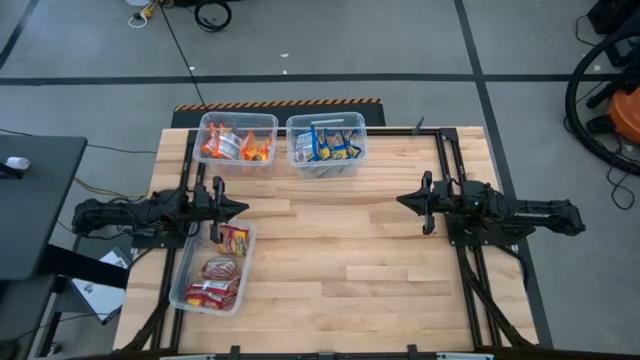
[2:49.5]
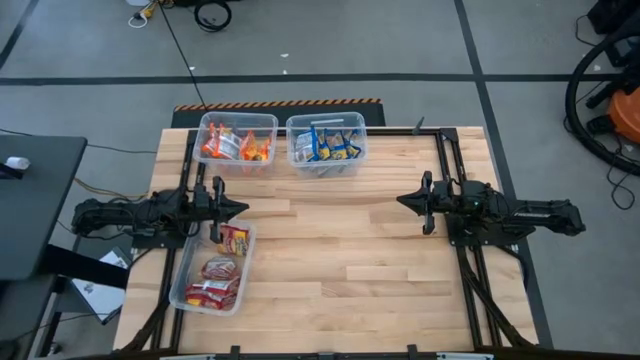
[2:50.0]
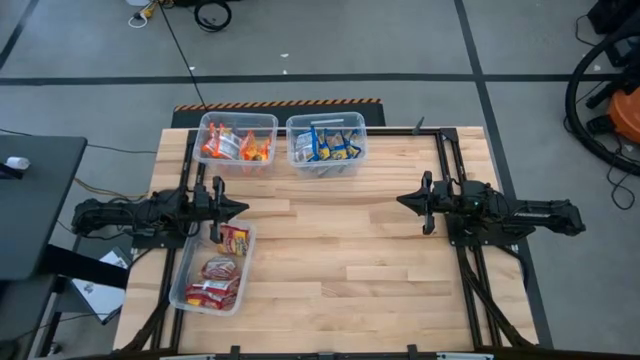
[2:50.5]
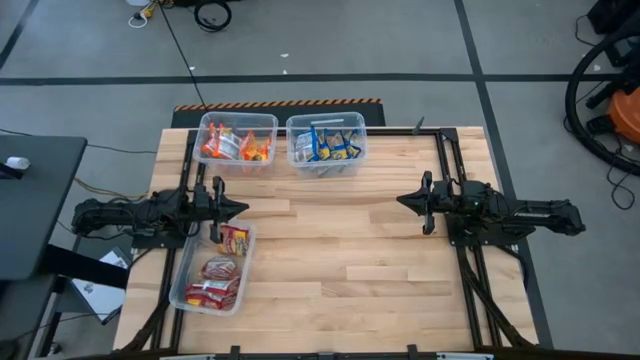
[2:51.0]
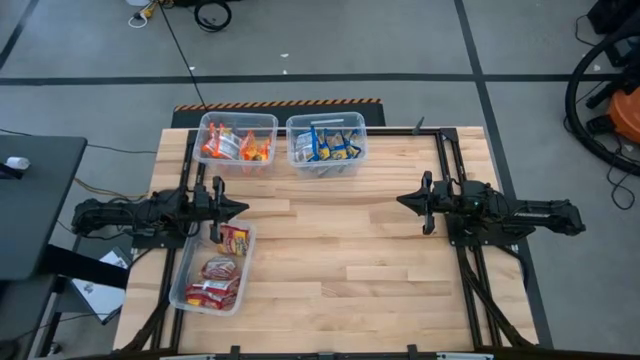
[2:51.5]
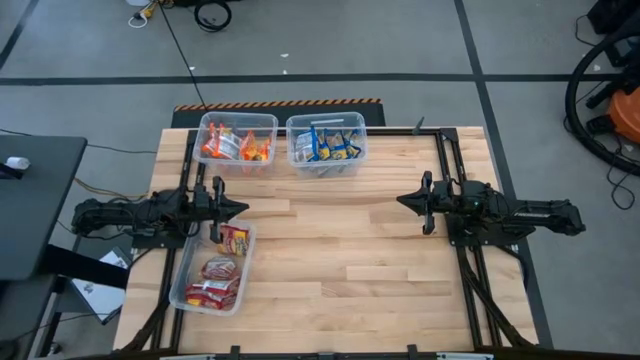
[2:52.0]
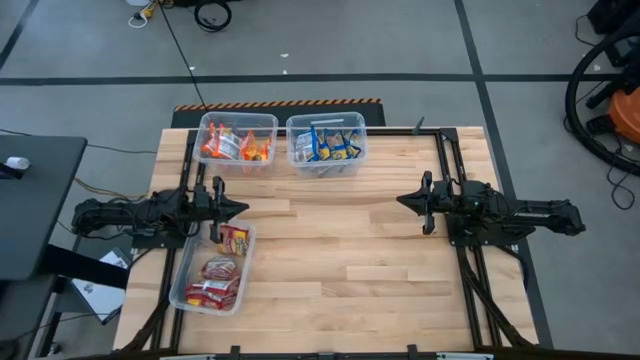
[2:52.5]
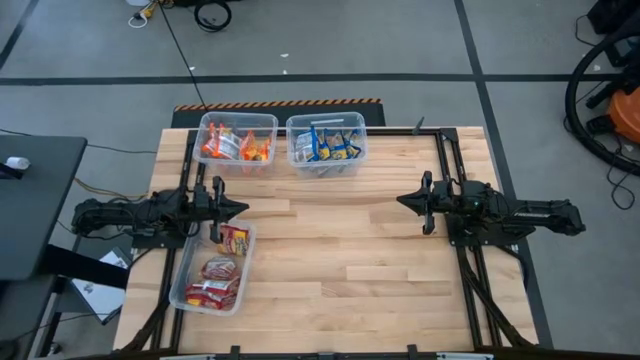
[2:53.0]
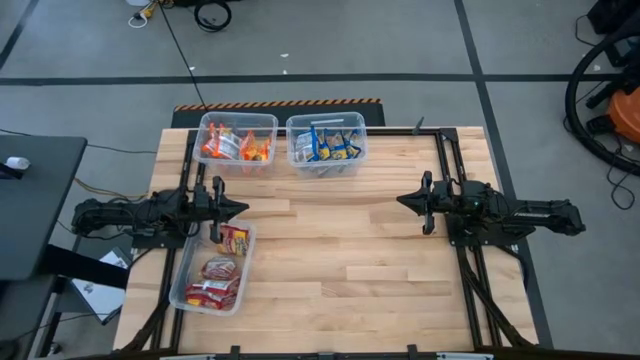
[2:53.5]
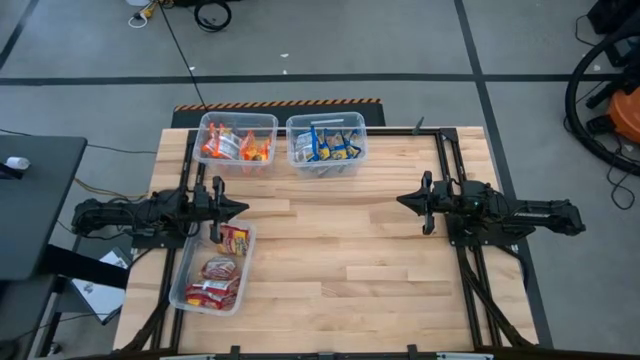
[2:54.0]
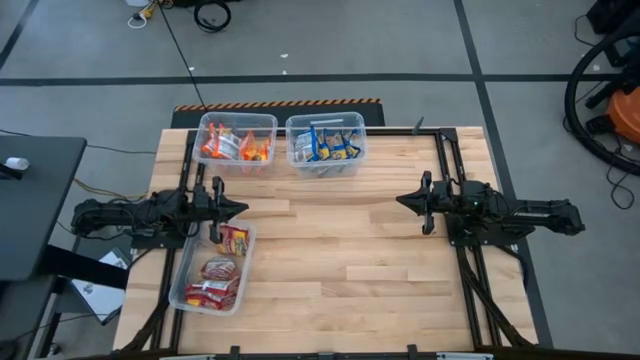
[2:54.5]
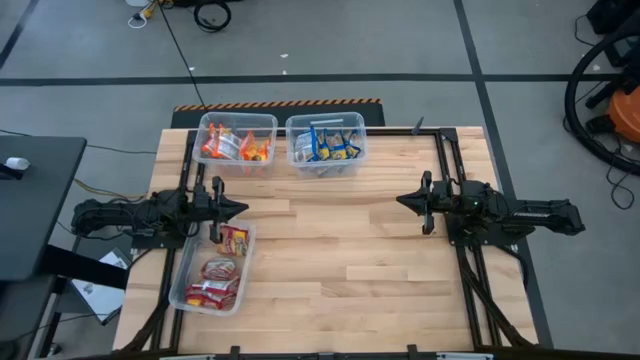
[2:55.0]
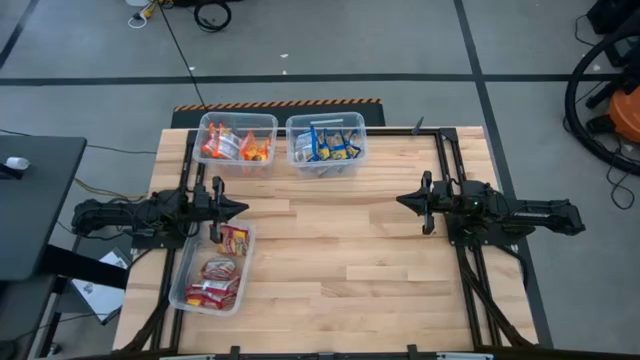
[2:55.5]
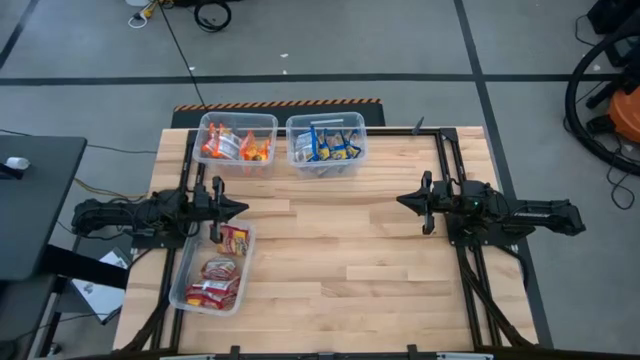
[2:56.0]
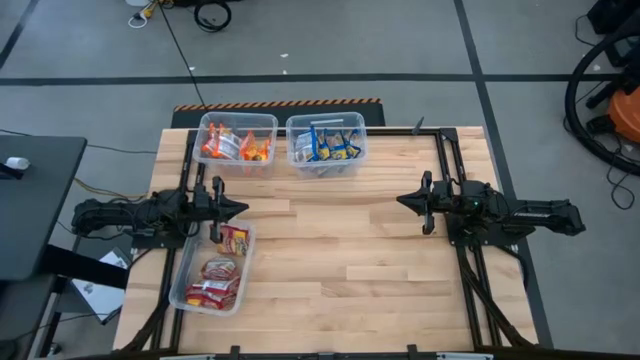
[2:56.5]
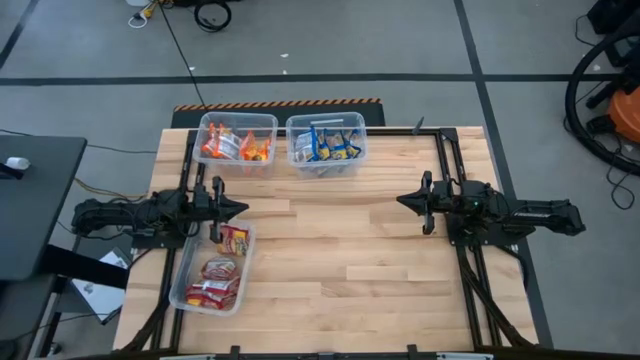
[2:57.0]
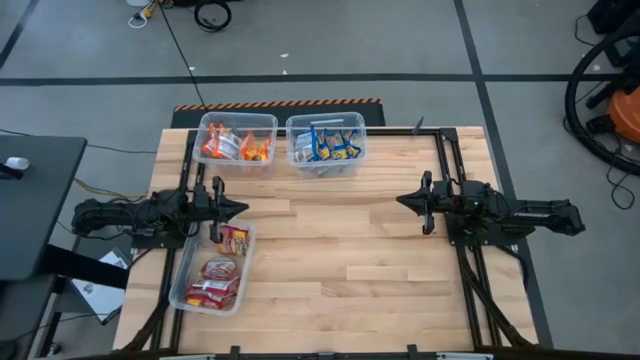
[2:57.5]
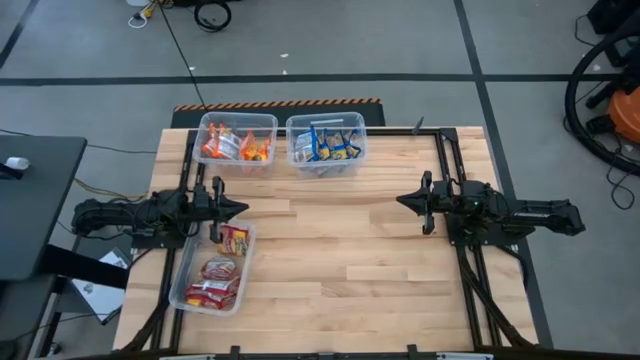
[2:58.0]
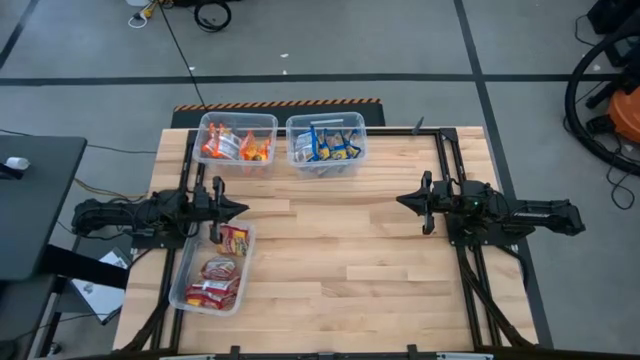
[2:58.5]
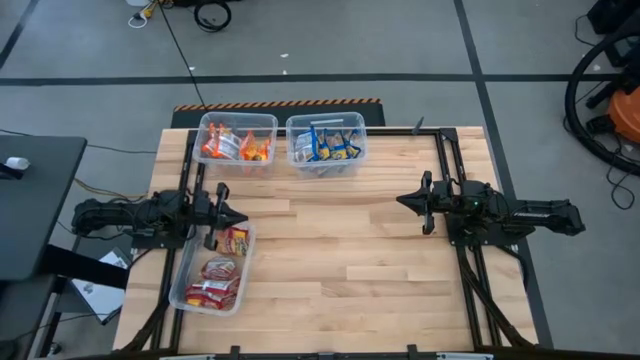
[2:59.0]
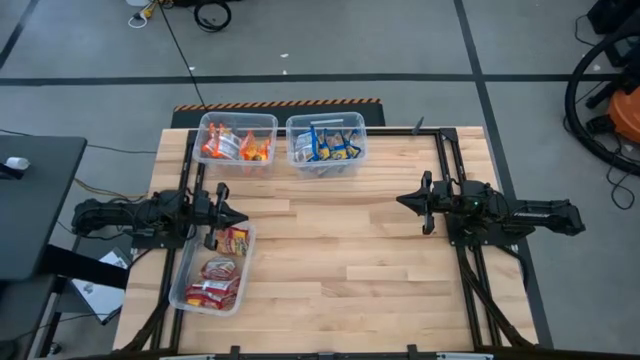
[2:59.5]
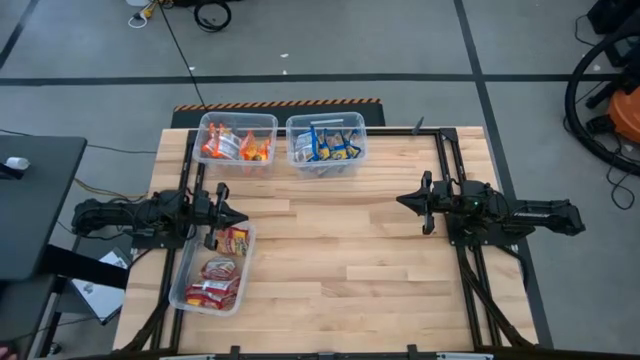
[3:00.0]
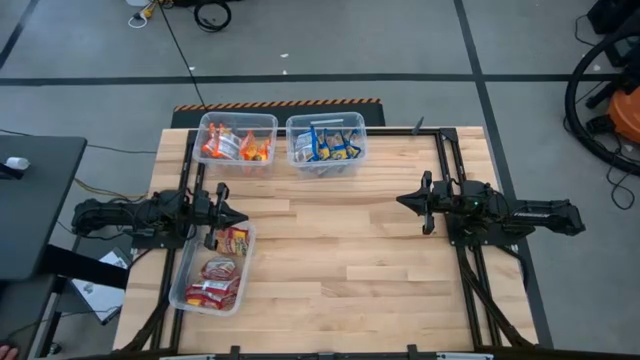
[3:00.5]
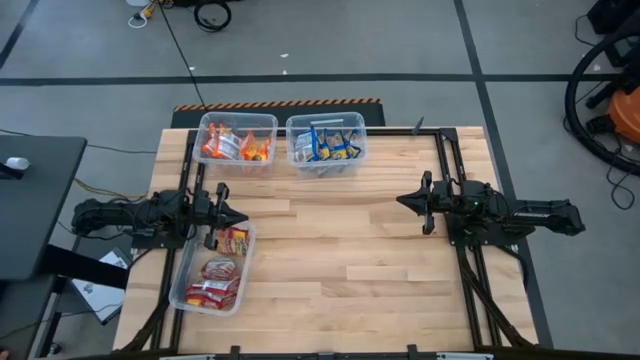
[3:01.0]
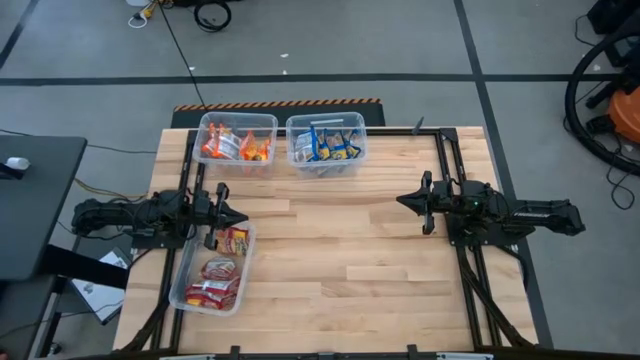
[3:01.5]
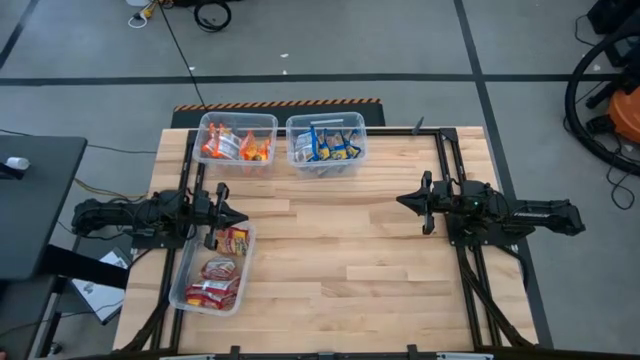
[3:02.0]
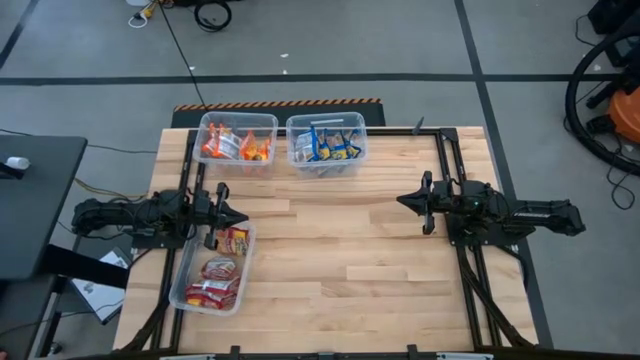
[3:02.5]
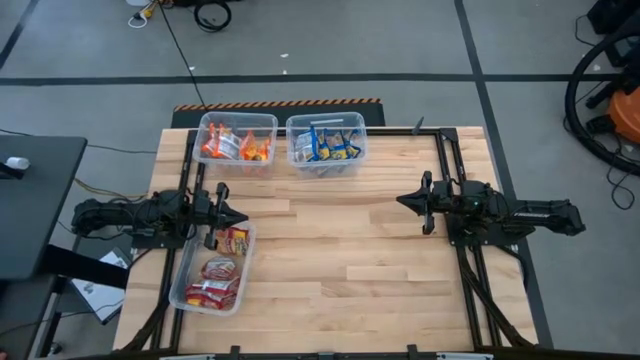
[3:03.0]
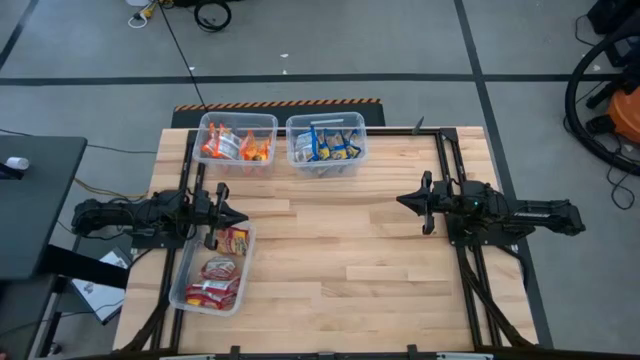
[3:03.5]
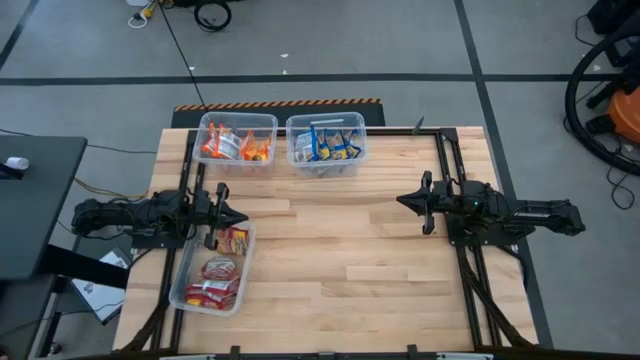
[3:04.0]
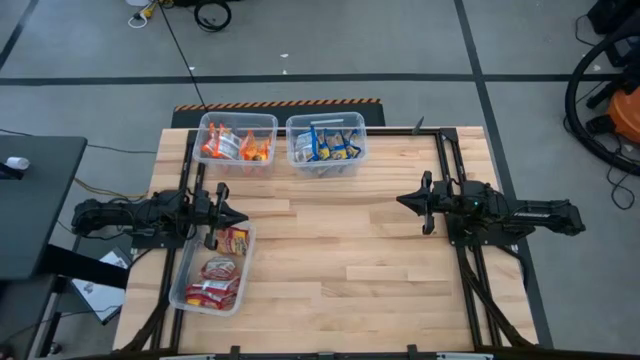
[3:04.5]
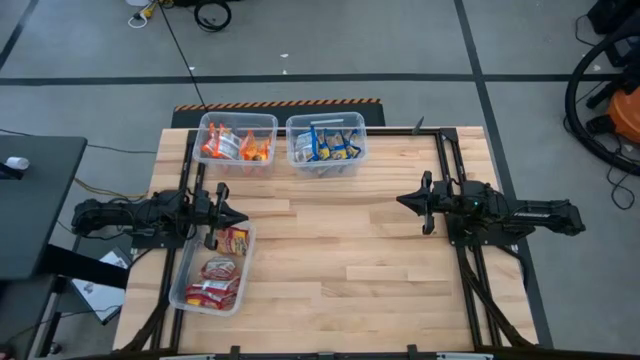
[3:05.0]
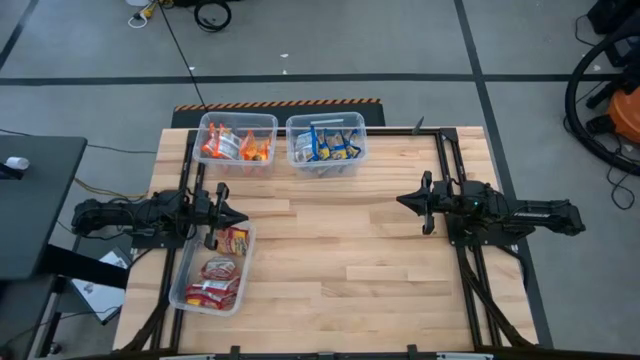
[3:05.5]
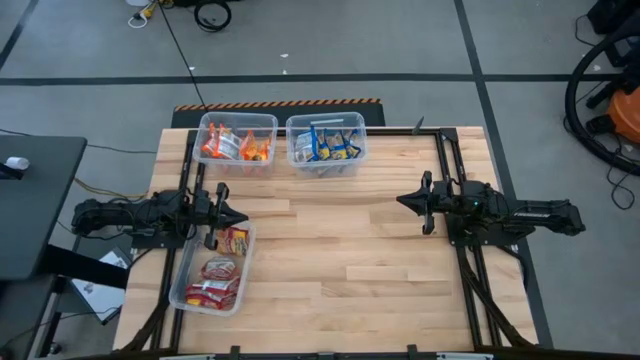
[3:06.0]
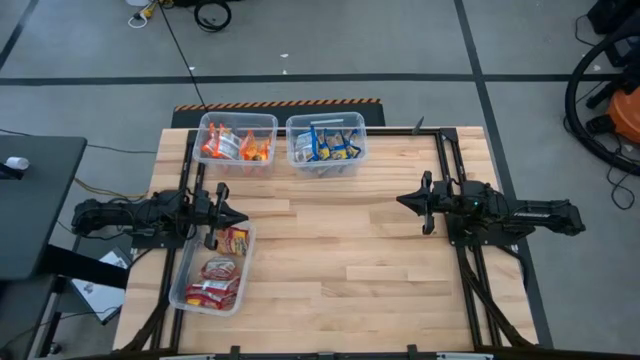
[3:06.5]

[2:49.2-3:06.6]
Task: Sort Maruchan noodles
Return to Home Position

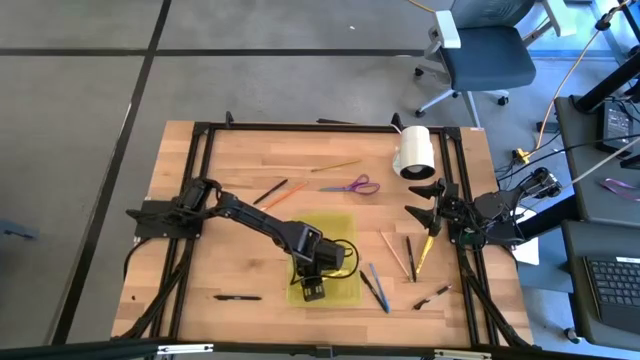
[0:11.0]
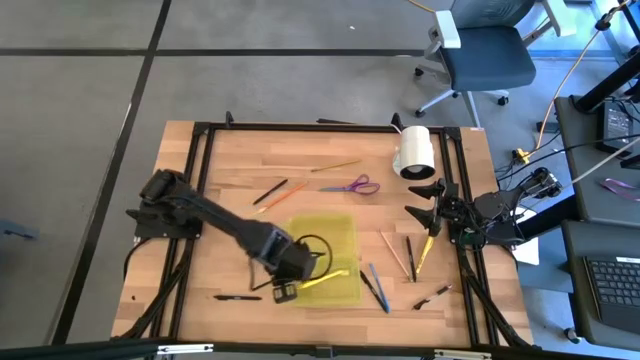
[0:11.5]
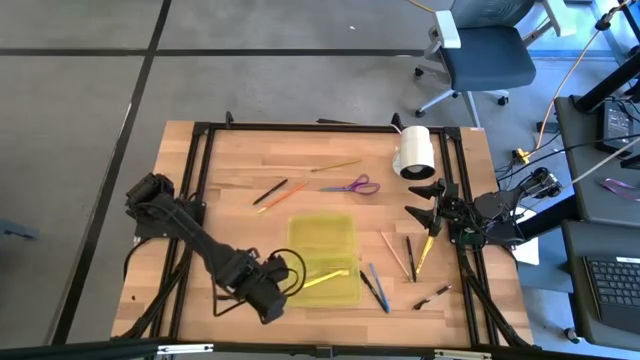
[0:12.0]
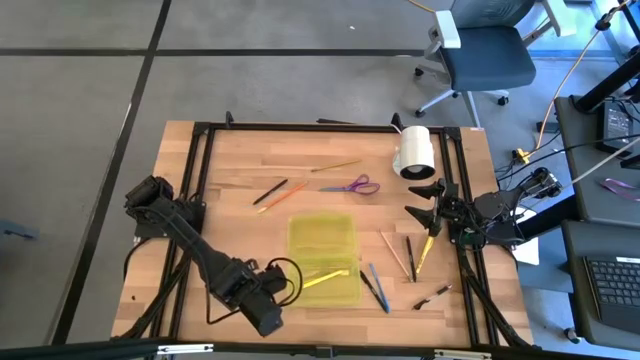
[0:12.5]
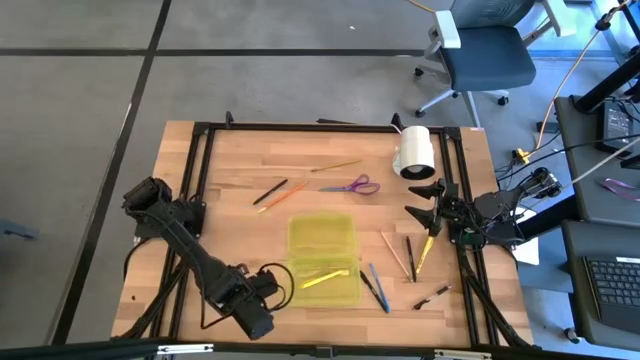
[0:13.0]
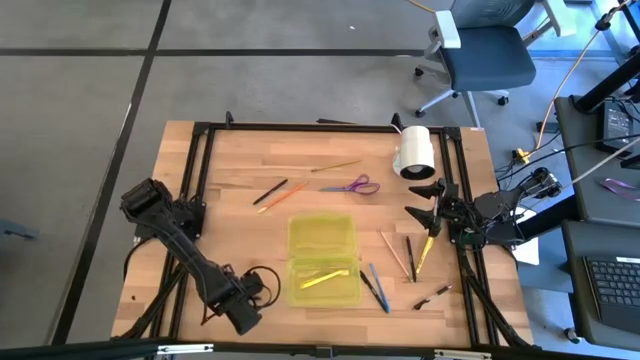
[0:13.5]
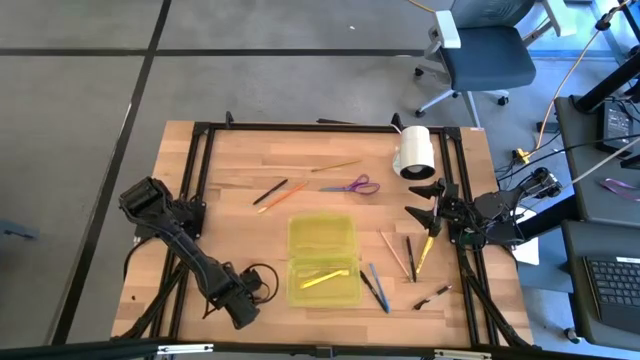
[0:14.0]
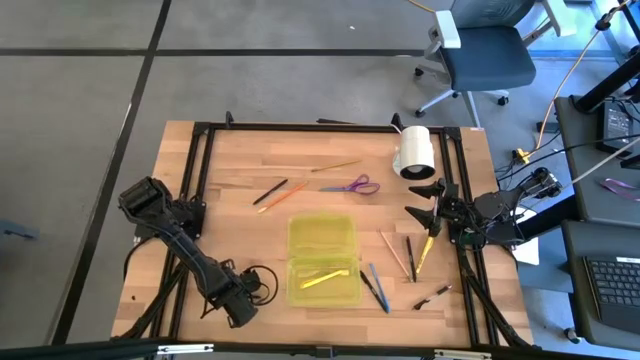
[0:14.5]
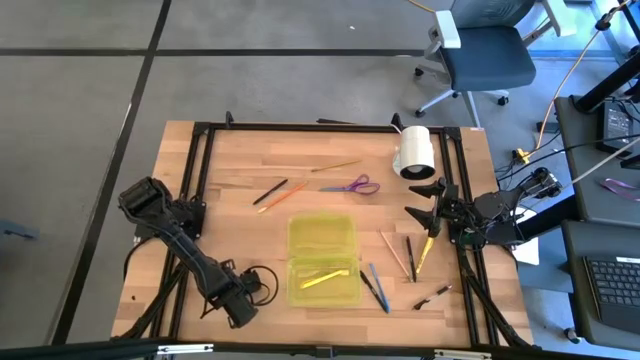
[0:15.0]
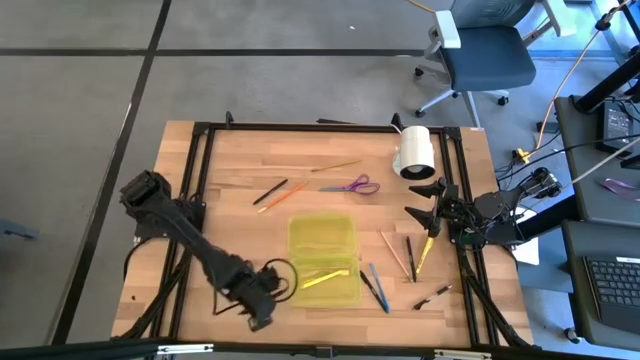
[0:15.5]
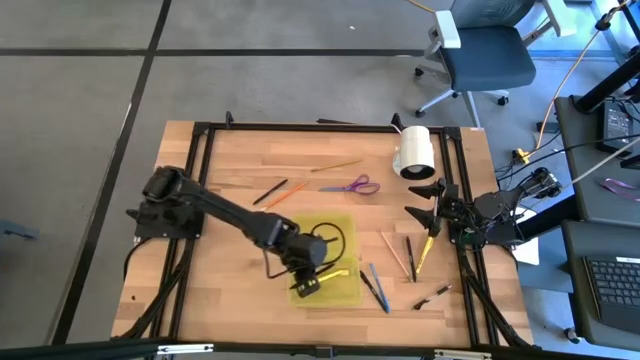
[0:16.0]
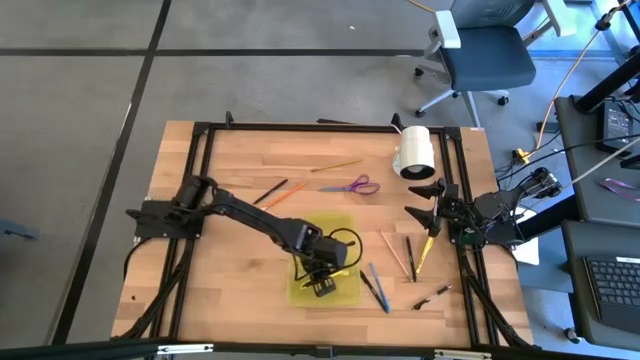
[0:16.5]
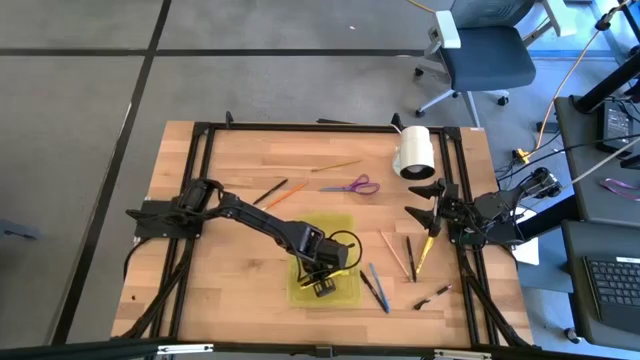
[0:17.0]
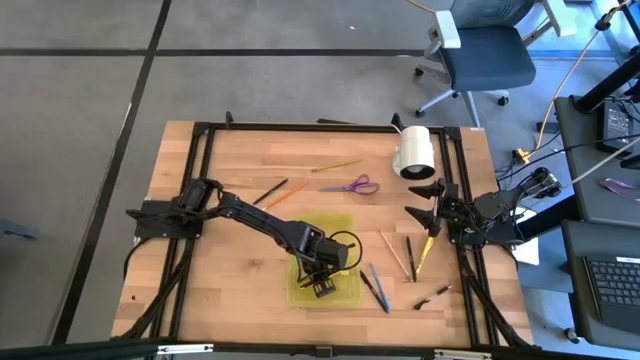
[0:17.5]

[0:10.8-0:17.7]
Task: Pick & place school supplies into a supply box
Put the black pen into the yellow supply box
